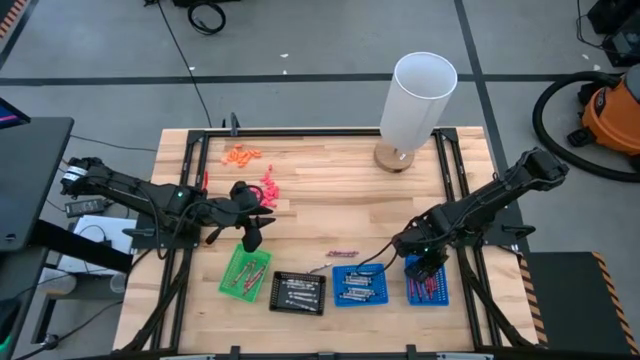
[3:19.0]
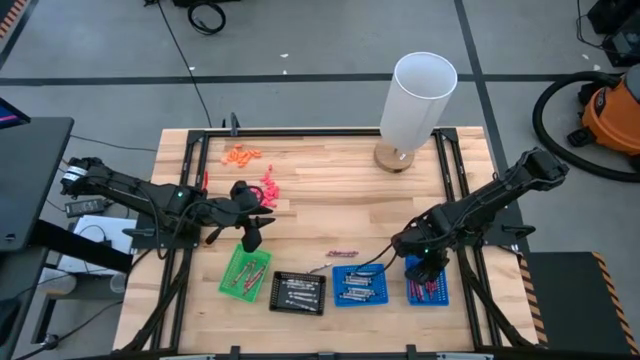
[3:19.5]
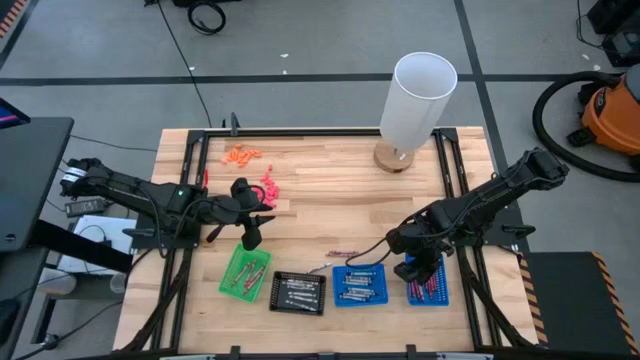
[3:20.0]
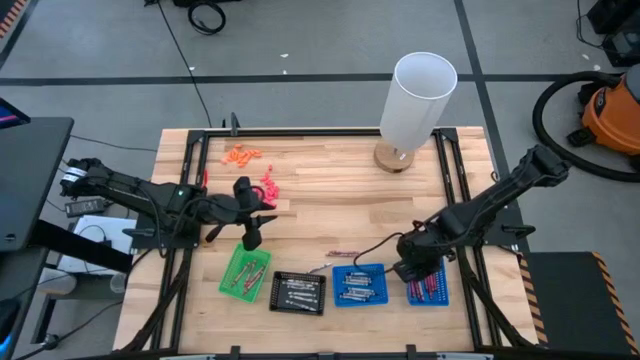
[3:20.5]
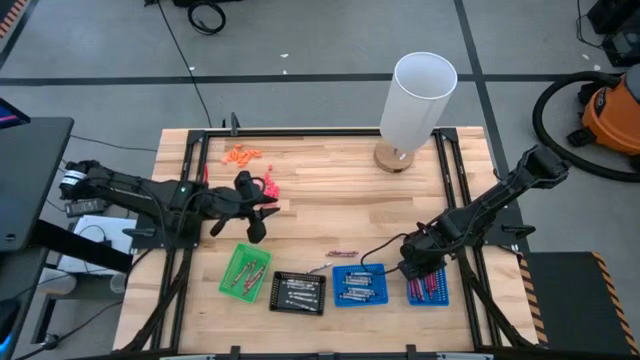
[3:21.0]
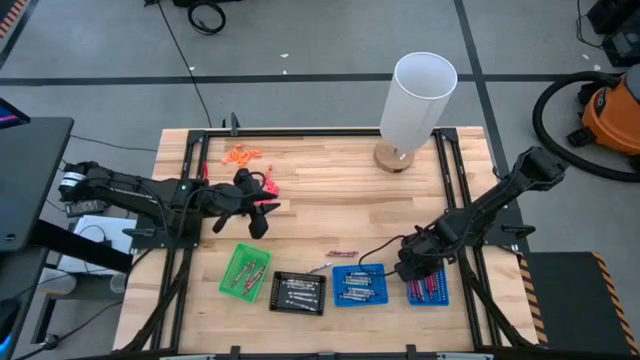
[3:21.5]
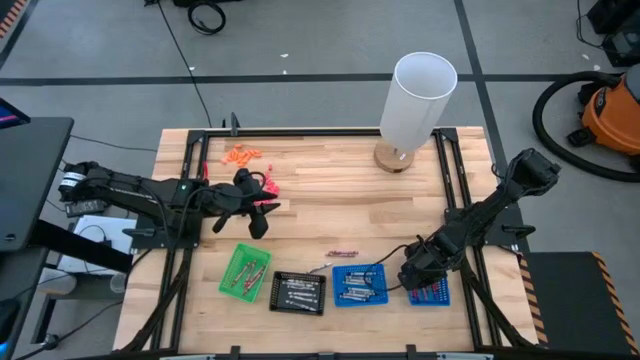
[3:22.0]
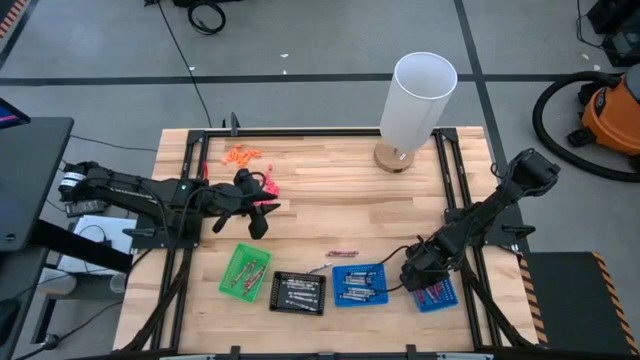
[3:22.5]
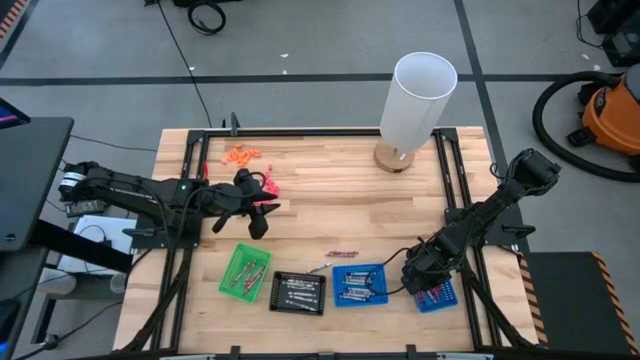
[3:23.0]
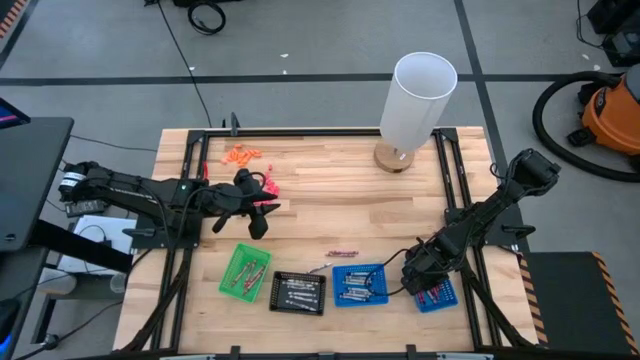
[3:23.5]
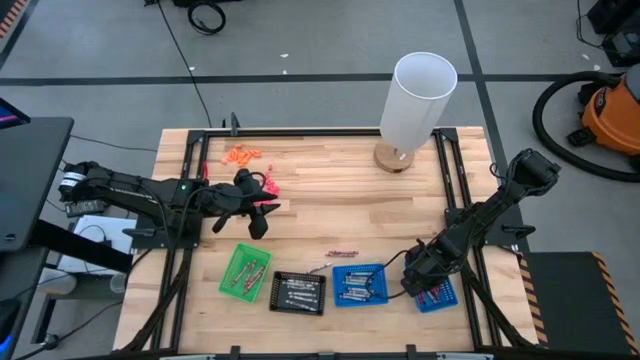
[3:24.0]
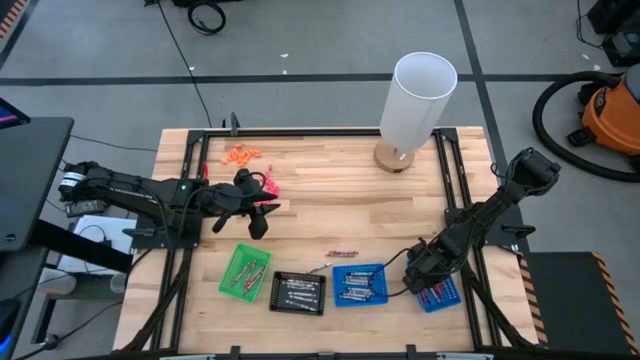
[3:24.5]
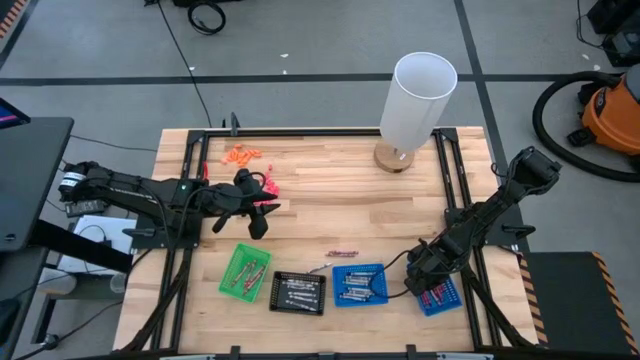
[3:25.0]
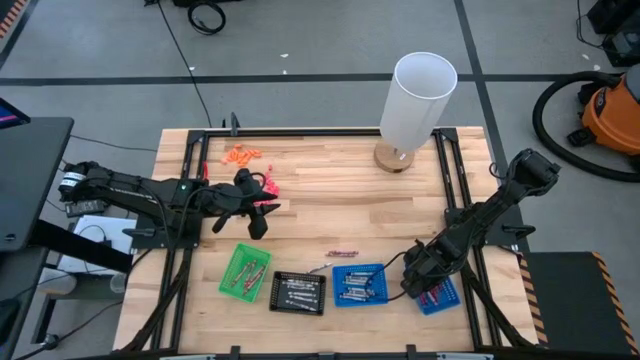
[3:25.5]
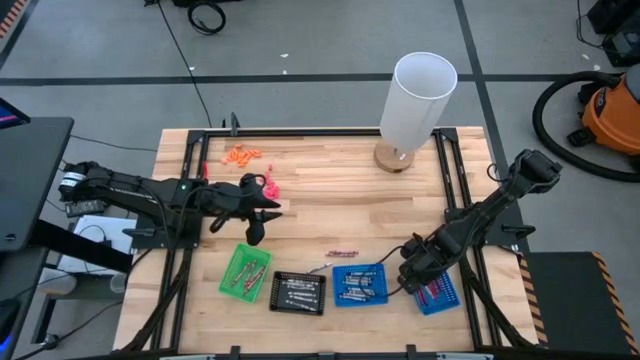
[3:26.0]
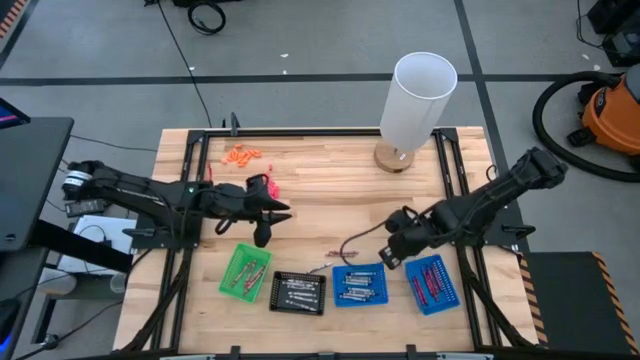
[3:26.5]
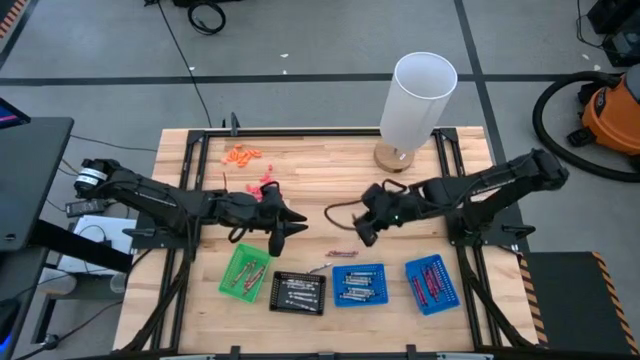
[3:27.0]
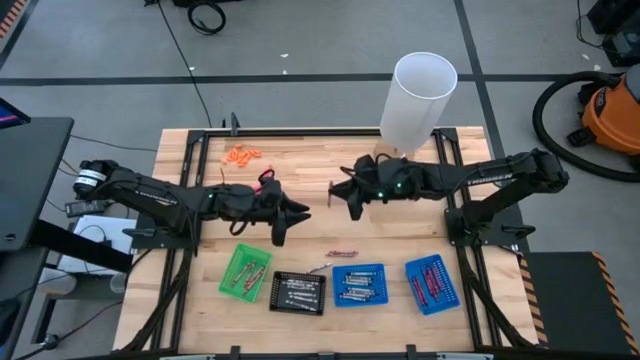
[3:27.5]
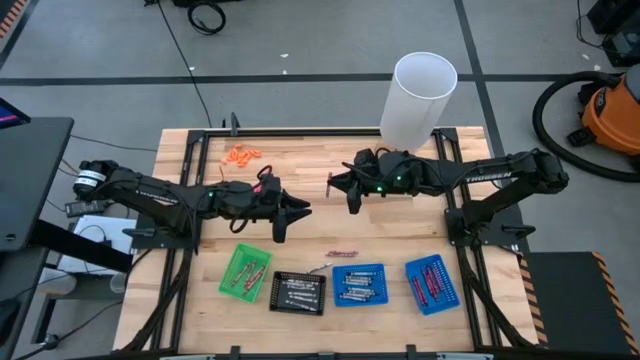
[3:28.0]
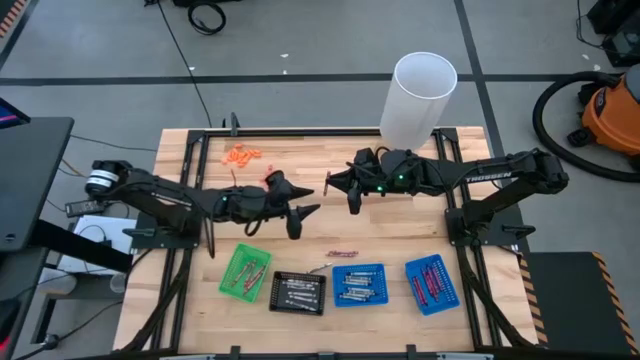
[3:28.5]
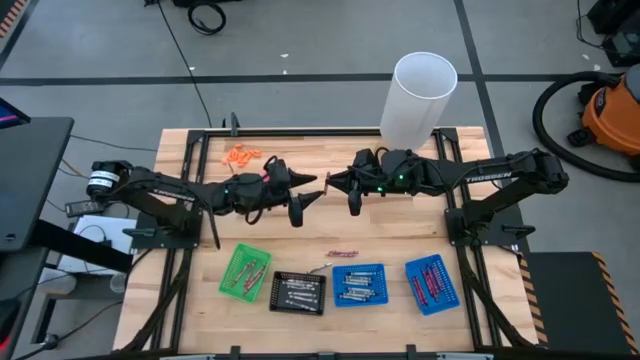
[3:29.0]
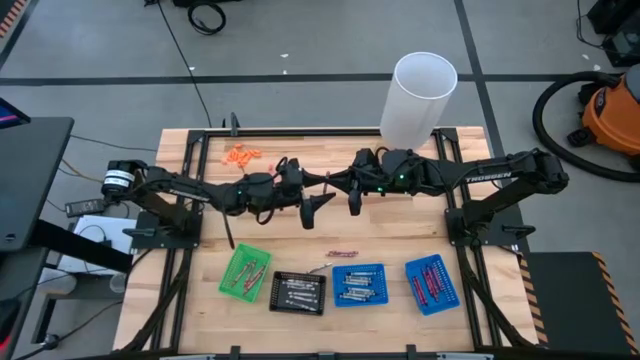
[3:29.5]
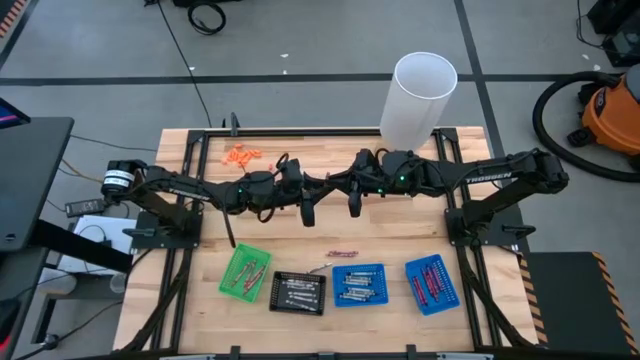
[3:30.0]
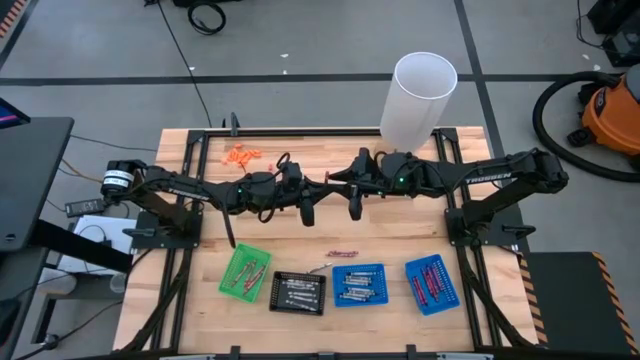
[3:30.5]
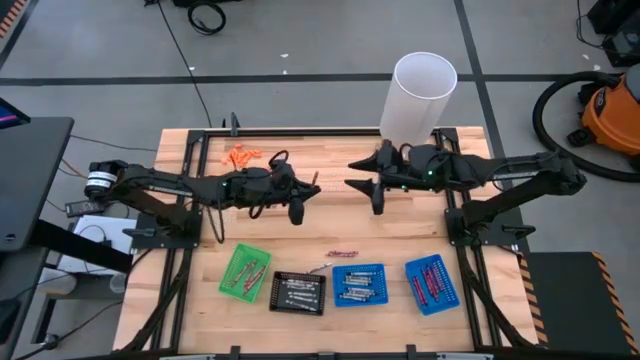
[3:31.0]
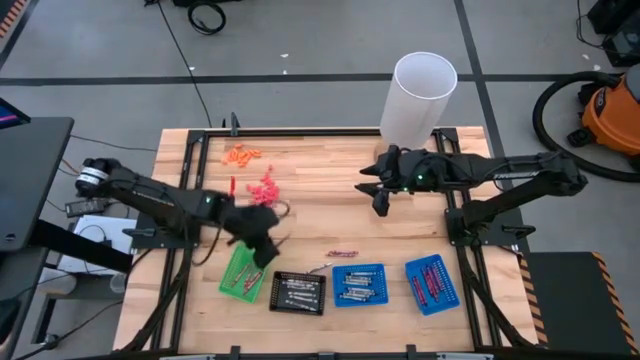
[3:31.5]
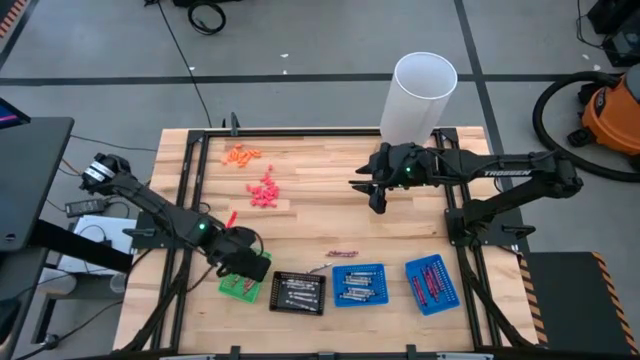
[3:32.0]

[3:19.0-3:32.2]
Task: Sort crayons
Put the pink crayon into the green basket

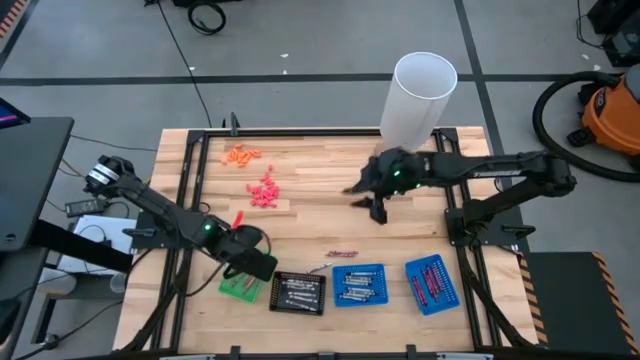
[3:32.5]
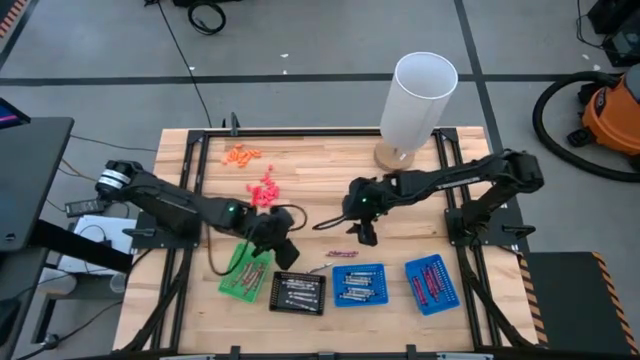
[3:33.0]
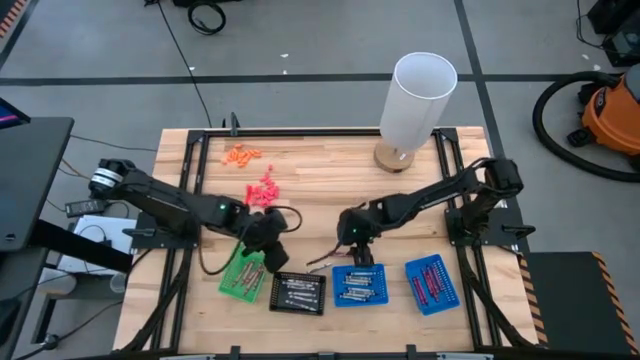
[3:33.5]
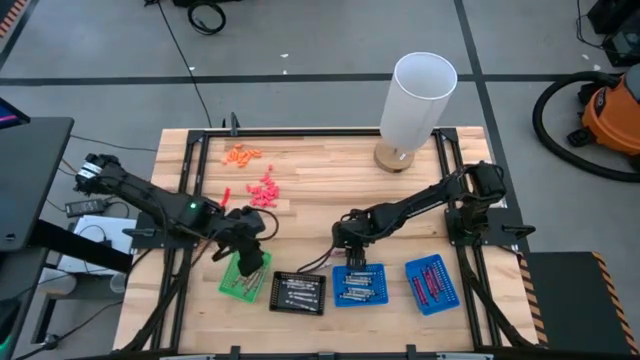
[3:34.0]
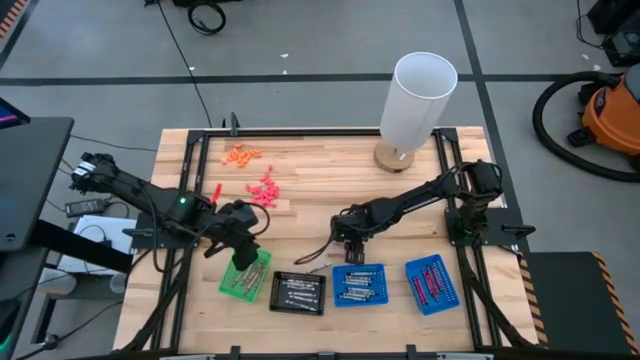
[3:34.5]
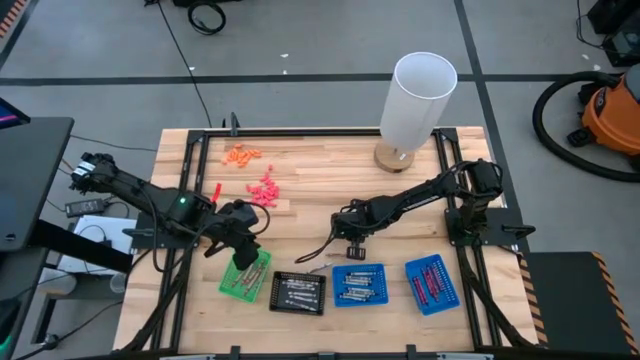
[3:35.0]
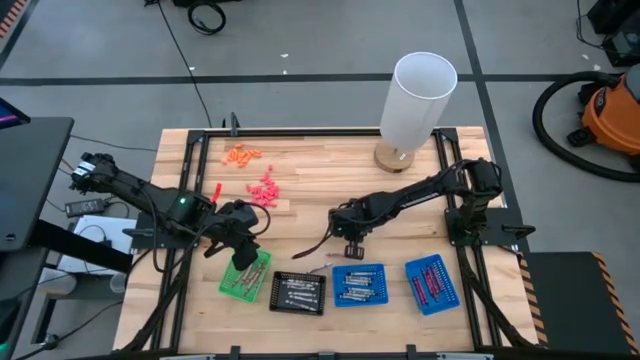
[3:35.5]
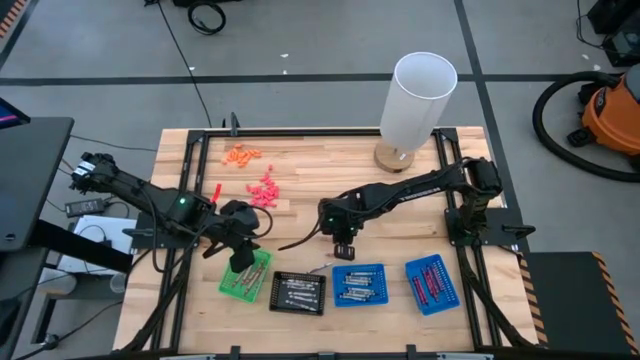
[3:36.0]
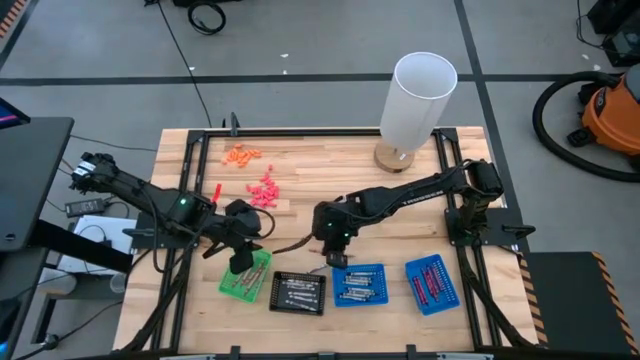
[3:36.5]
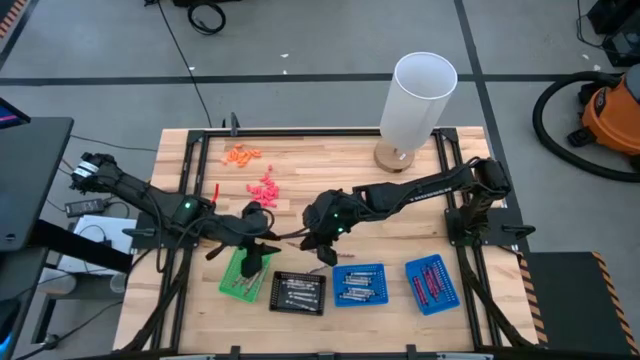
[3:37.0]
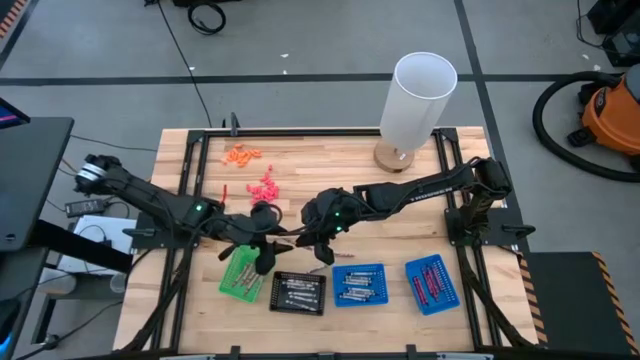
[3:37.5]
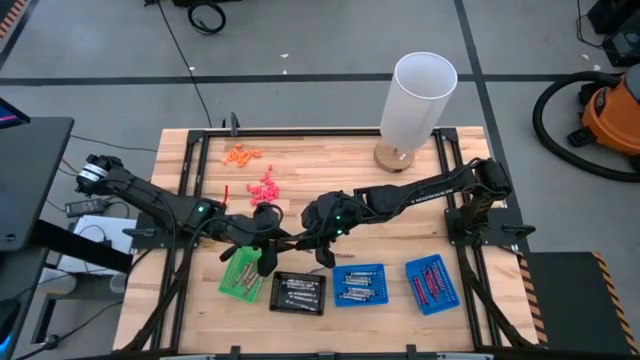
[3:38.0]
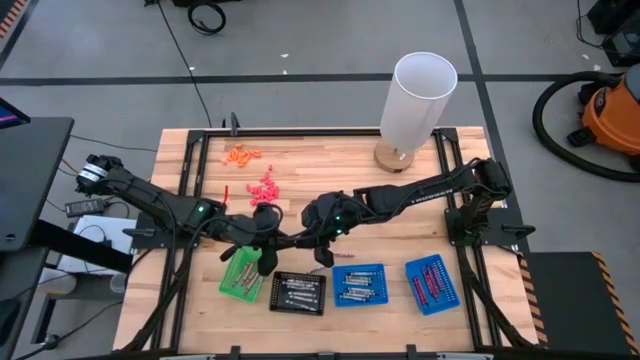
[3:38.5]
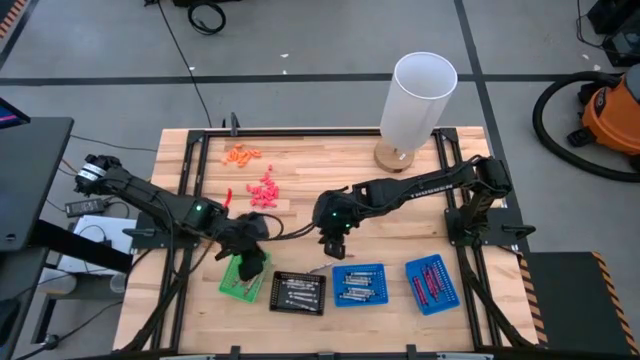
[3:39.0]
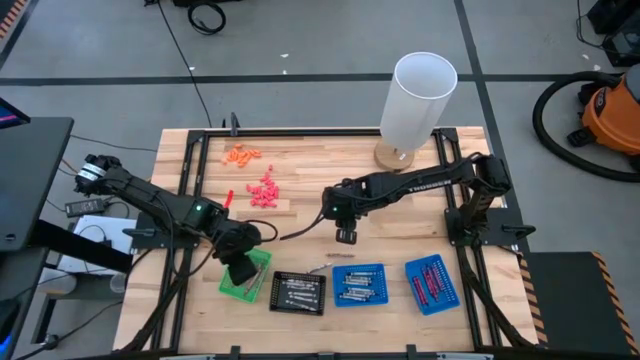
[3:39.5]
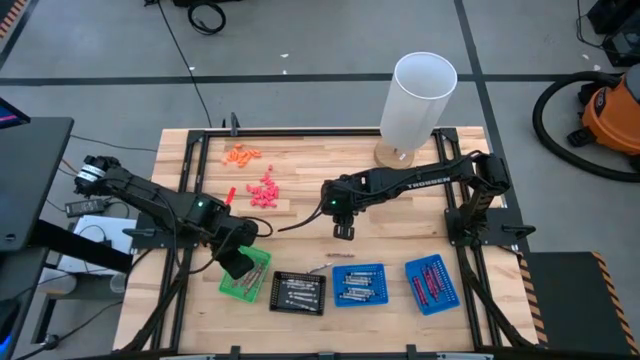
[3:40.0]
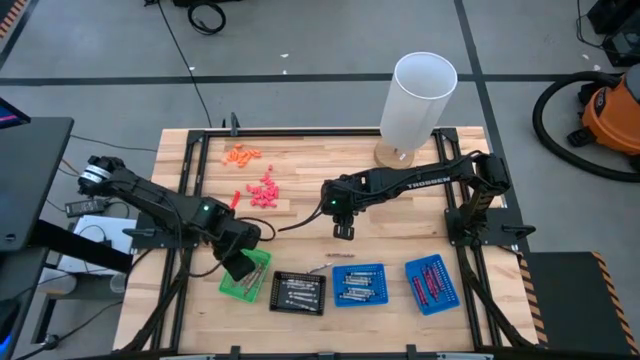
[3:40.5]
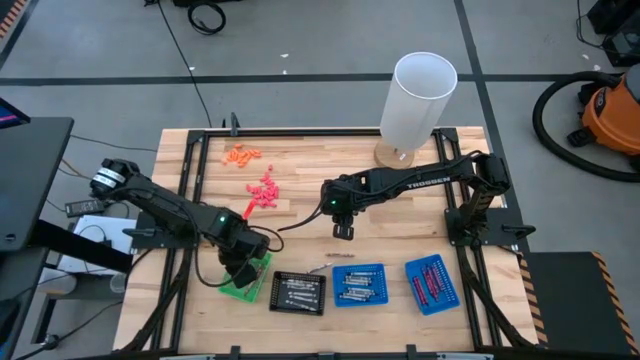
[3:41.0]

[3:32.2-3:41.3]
Put the pink crayon into the green basket
